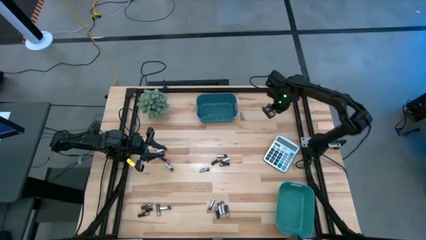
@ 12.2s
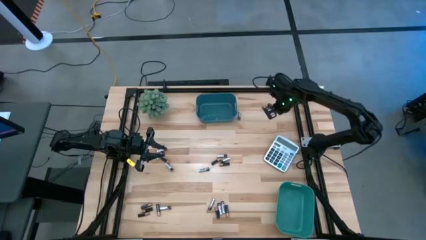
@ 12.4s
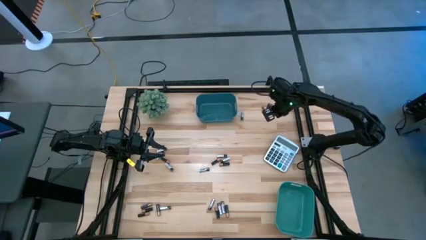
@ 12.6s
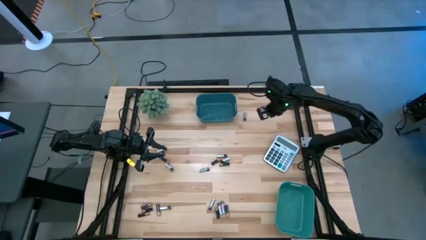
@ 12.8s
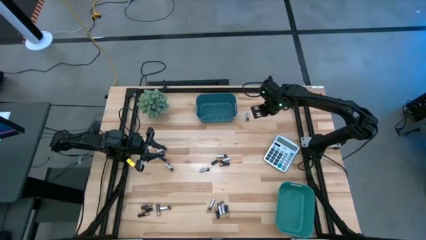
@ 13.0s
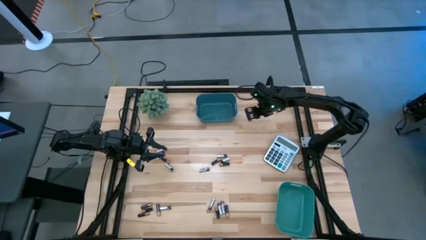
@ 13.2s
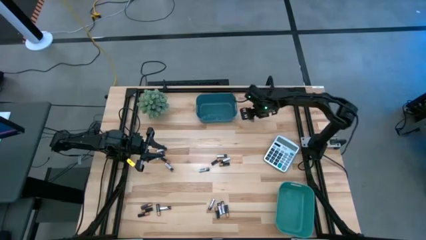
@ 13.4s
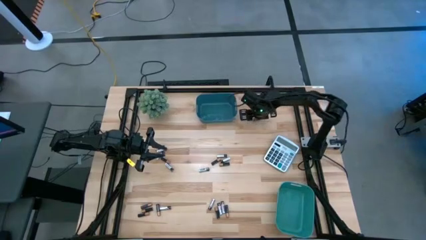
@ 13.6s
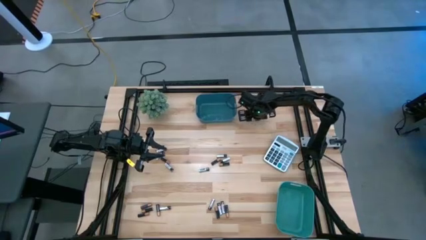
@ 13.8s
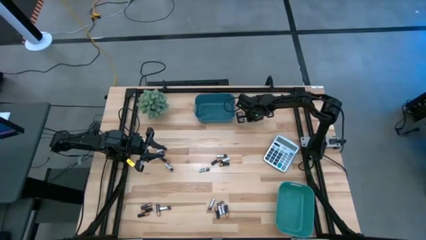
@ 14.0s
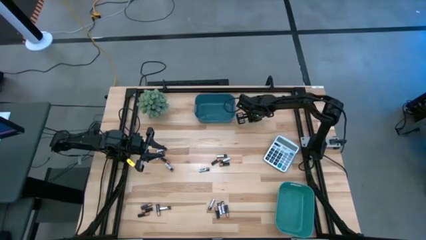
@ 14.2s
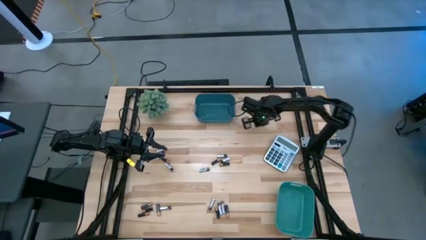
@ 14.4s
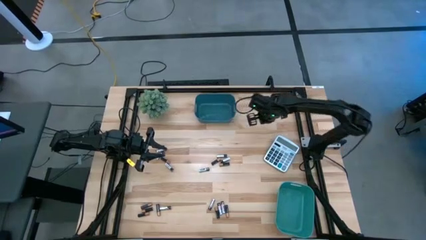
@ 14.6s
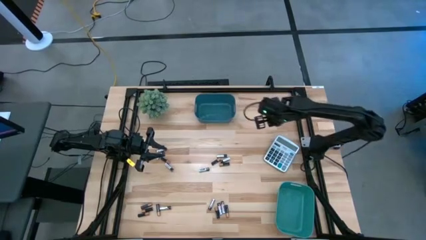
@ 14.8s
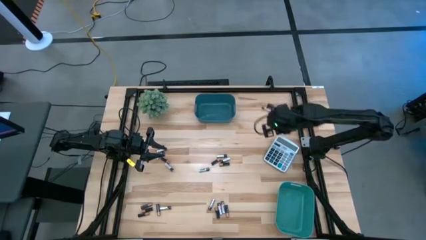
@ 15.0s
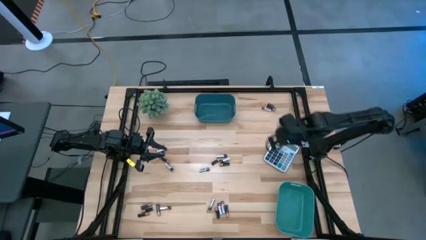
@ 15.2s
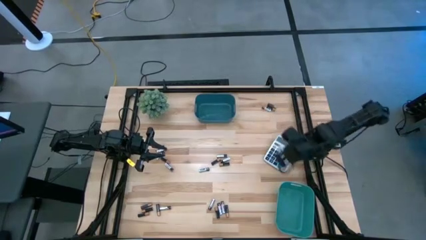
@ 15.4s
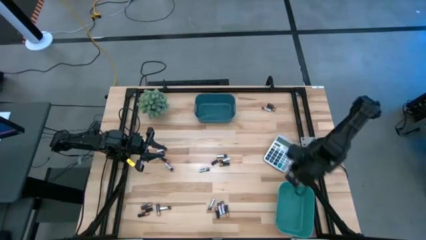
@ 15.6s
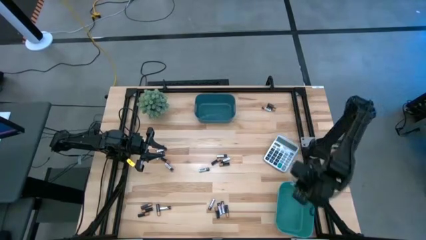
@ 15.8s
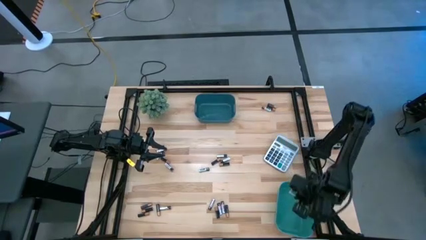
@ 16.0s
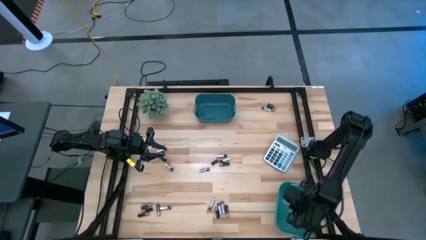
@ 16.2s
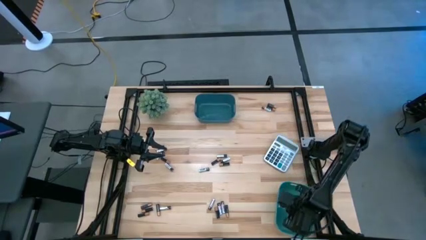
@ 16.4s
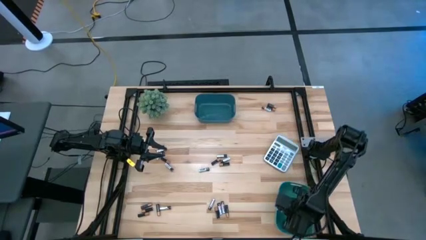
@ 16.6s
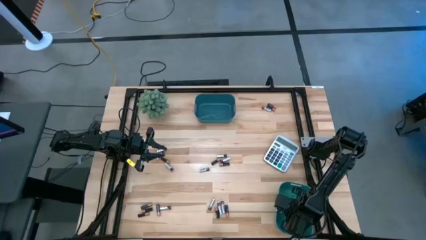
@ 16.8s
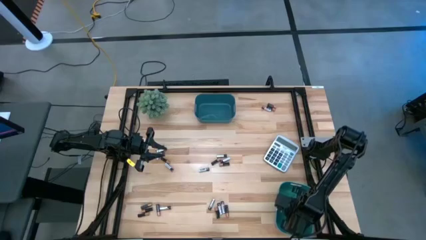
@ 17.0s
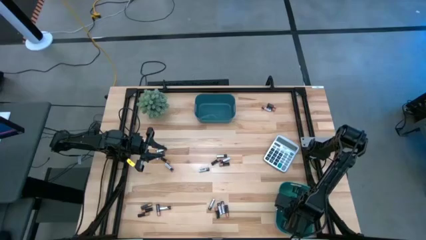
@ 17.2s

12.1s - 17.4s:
Task: Sort batteries
Put the silver battery into the green bin

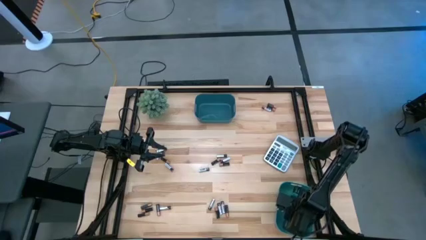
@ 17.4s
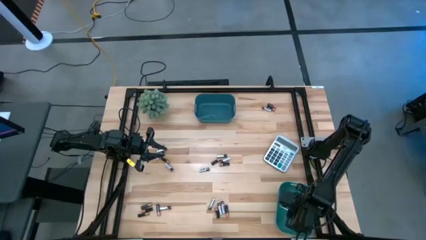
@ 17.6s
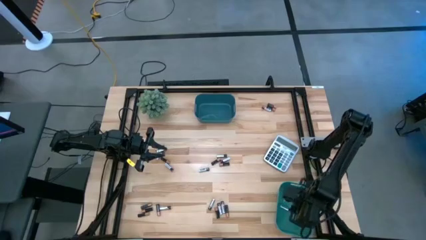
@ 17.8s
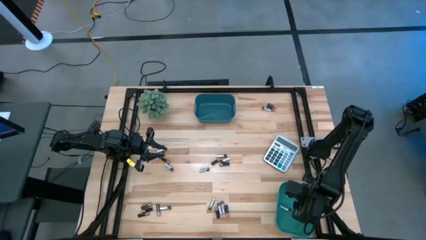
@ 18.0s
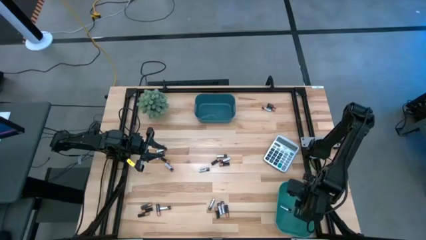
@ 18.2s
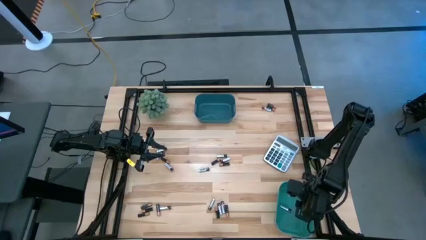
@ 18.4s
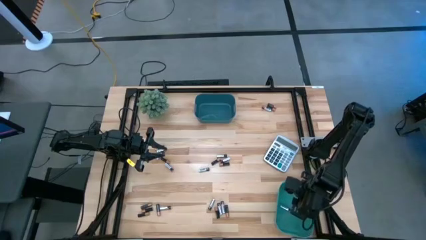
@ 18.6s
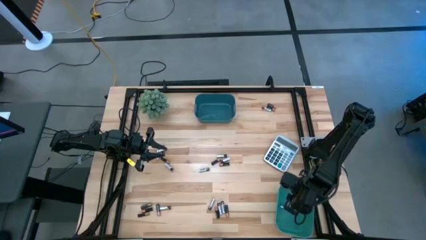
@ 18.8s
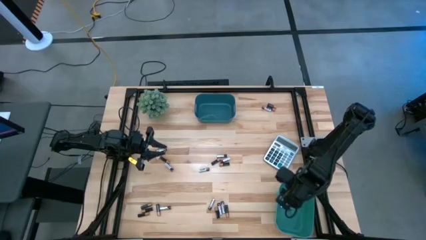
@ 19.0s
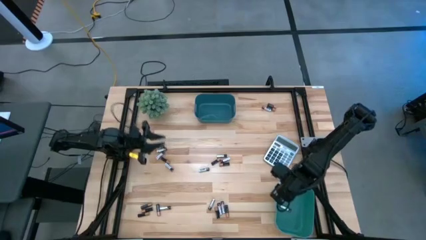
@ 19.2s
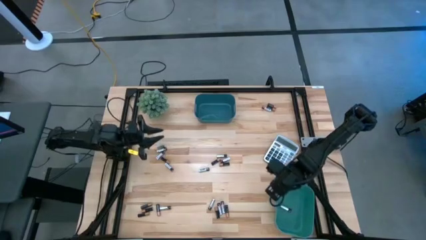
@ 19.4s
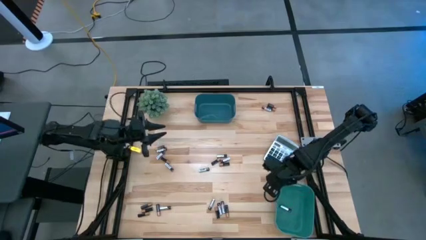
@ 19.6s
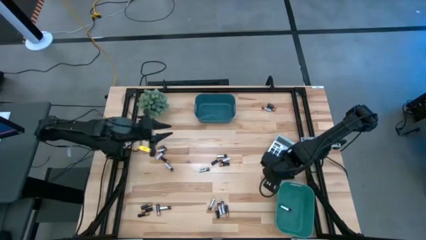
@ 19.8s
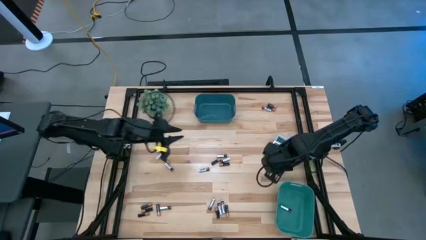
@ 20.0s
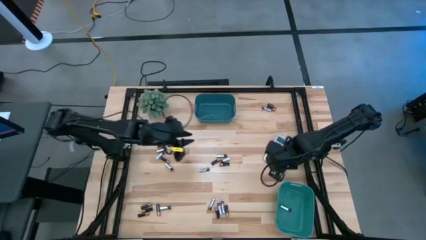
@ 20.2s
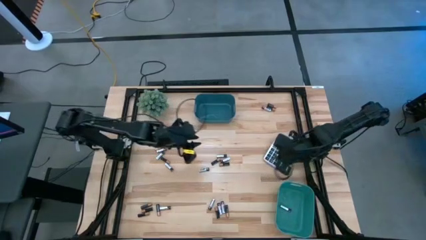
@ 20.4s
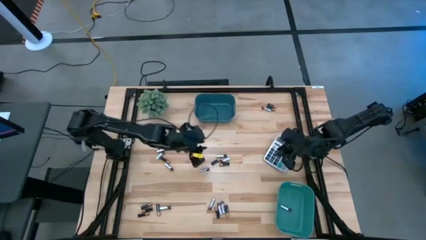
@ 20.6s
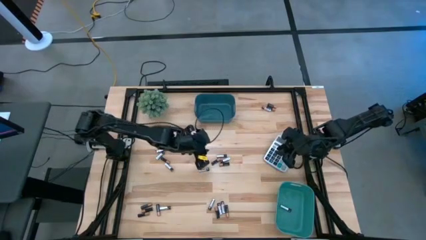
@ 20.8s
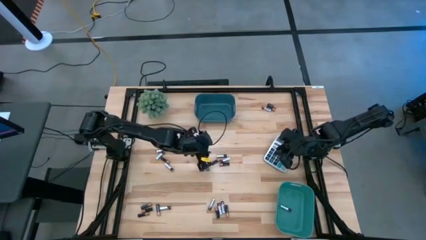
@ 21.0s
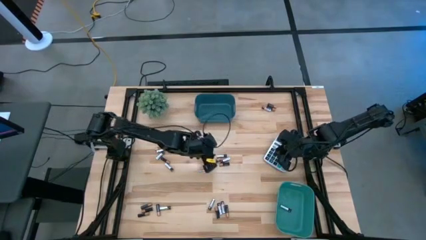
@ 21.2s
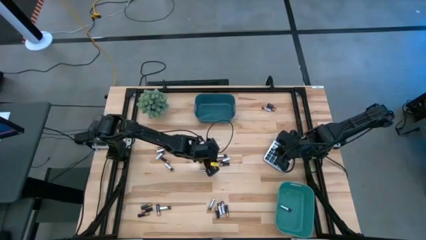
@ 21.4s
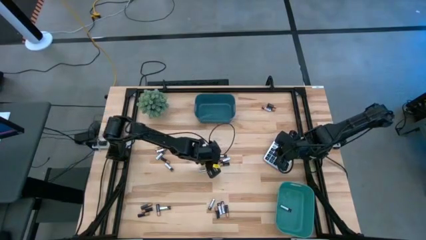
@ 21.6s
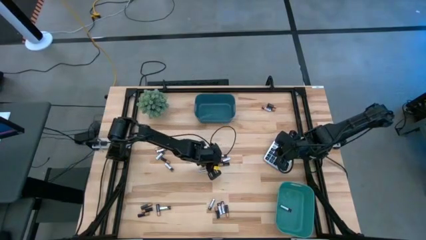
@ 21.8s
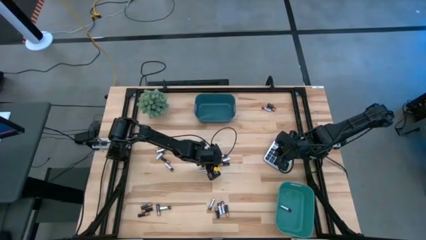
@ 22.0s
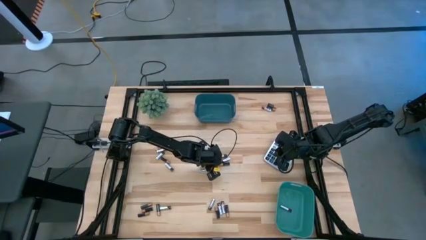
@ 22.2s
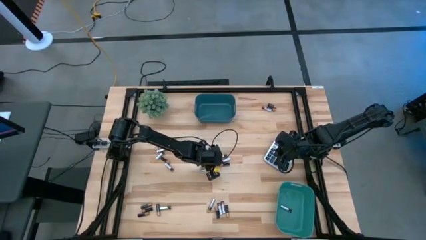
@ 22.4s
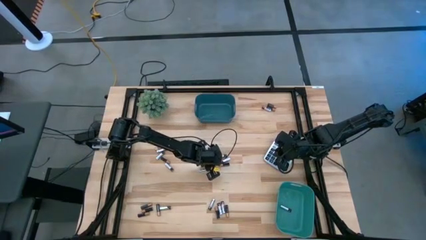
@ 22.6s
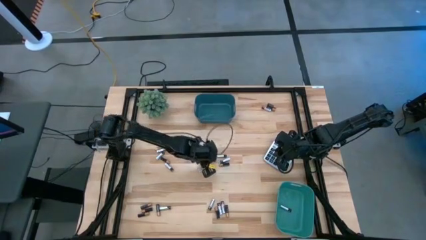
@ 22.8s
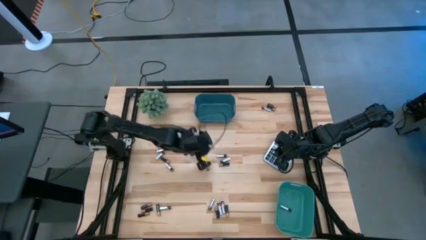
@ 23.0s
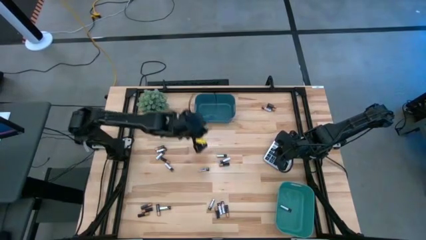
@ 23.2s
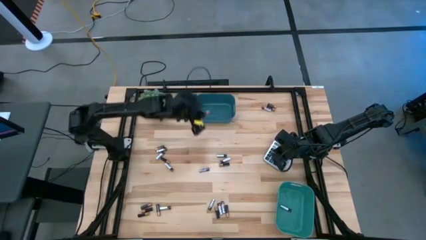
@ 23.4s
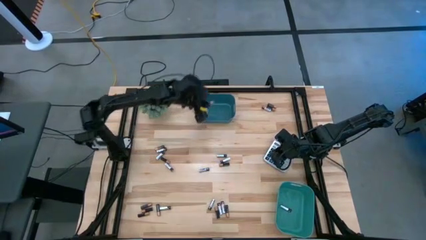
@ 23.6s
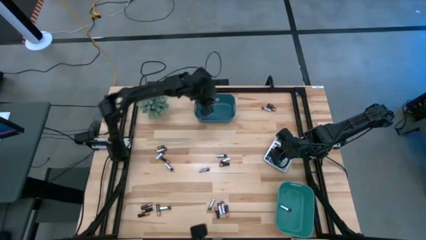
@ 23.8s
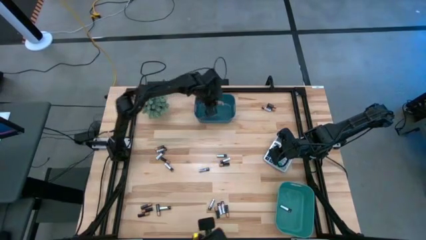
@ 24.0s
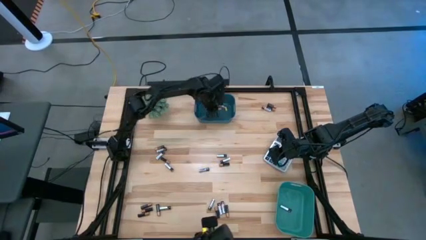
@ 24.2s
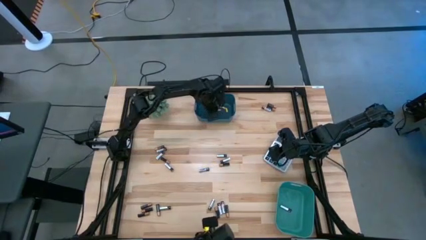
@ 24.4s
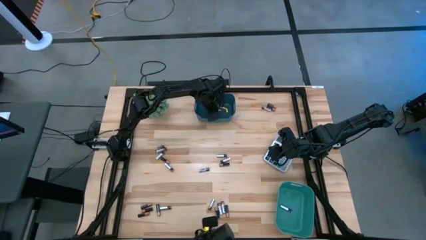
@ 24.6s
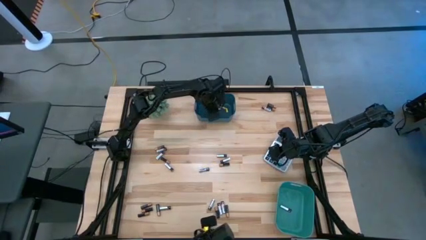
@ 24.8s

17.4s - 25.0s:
Put the black battery into the blue bin
